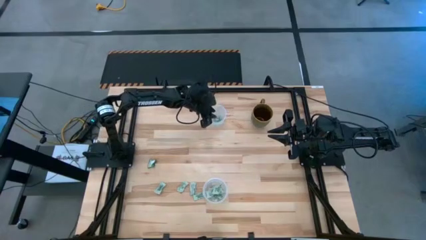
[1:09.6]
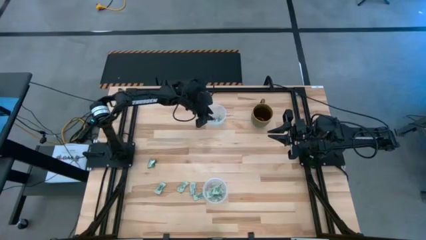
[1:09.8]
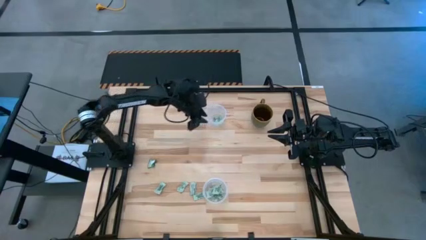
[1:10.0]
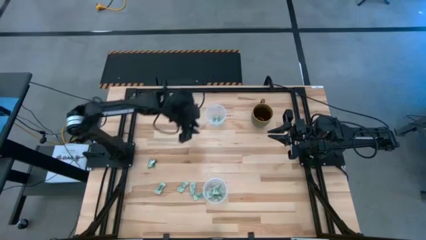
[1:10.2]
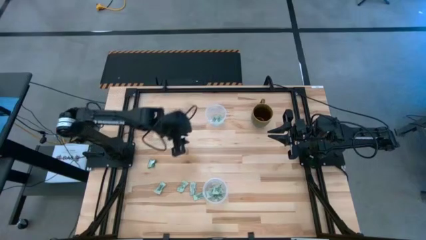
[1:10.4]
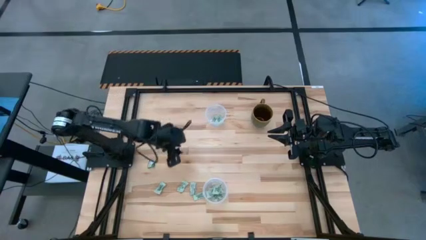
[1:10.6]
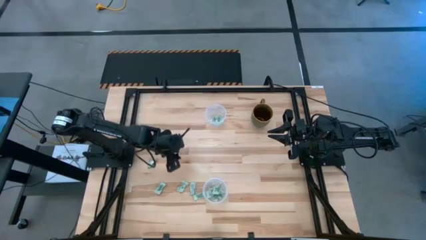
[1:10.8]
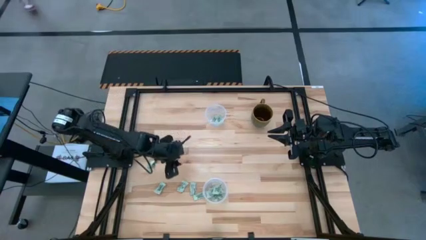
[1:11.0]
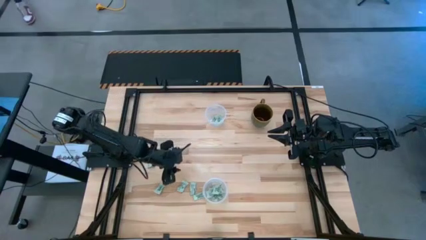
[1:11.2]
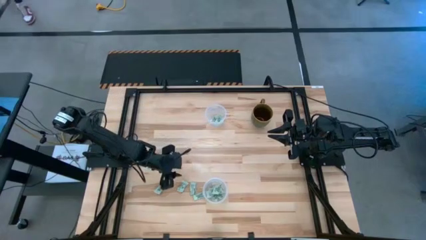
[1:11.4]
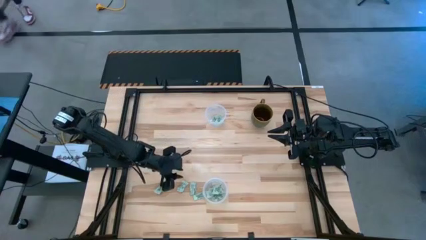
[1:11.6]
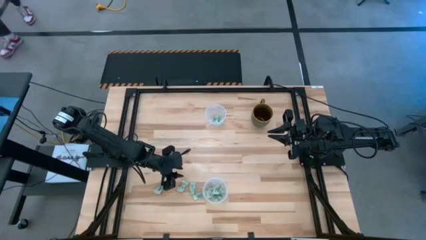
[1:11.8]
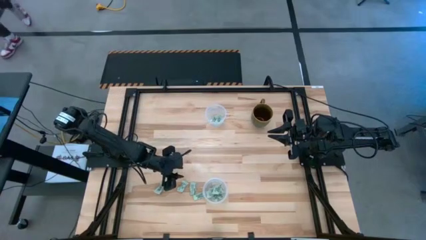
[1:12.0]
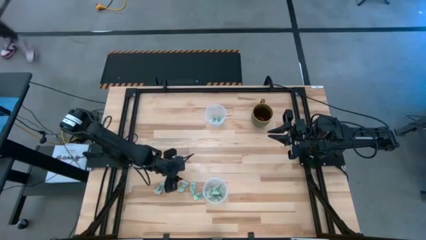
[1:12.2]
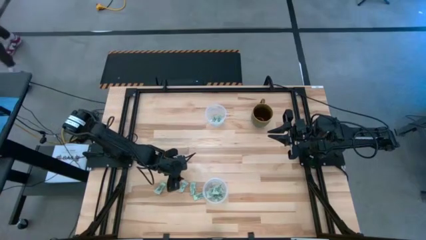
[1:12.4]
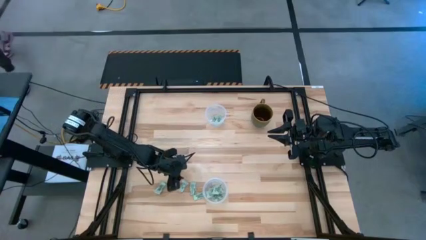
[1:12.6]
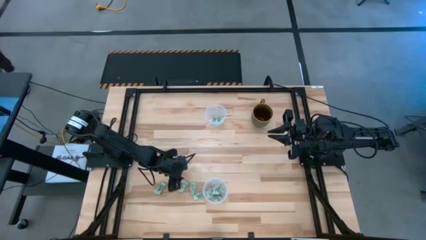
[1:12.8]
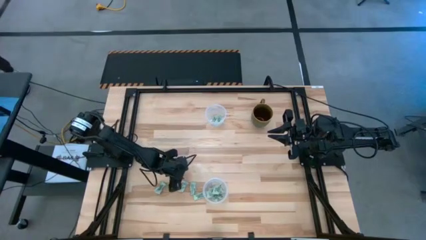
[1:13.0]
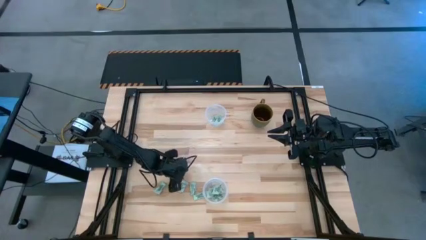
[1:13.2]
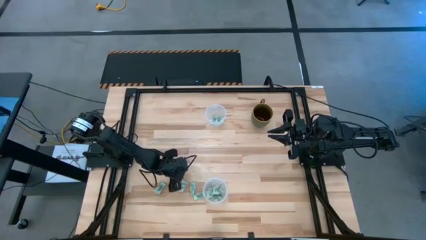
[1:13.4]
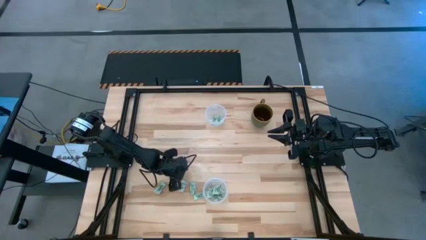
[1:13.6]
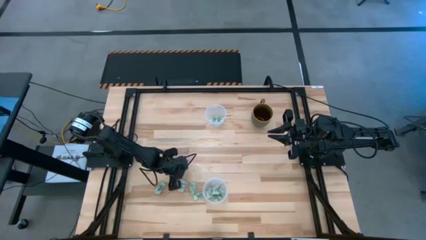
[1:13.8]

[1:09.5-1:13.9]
Task: Pick and place Stevia / Truvia into bins
Put the stevia packet into the top transparent container

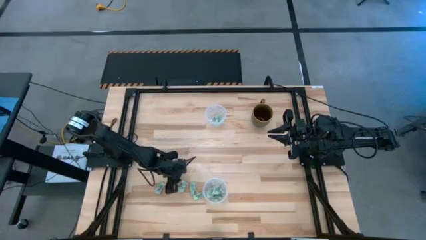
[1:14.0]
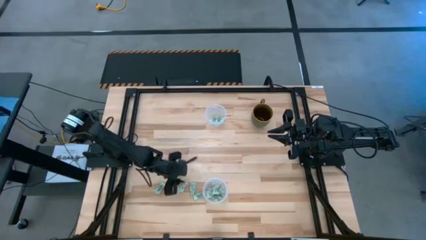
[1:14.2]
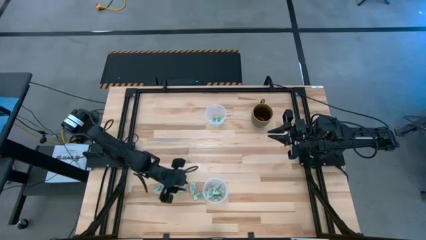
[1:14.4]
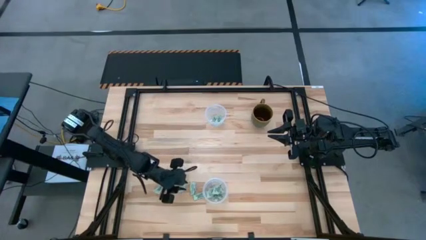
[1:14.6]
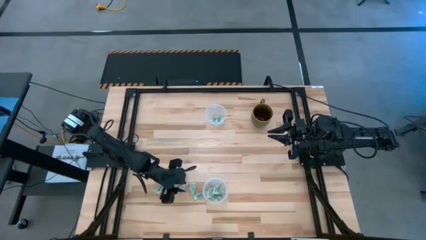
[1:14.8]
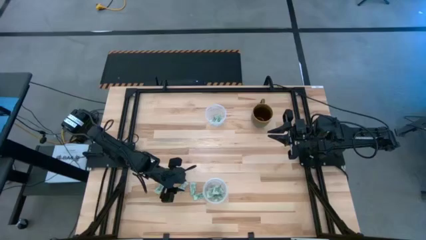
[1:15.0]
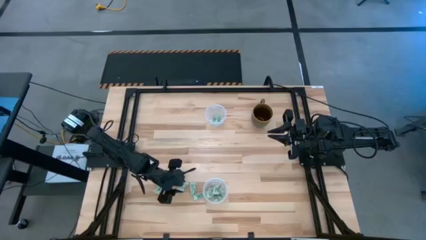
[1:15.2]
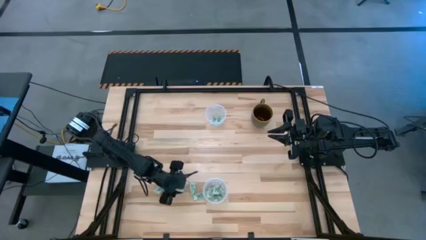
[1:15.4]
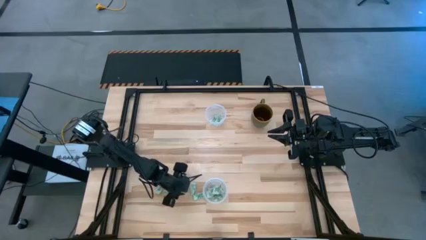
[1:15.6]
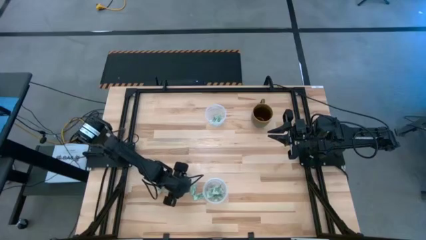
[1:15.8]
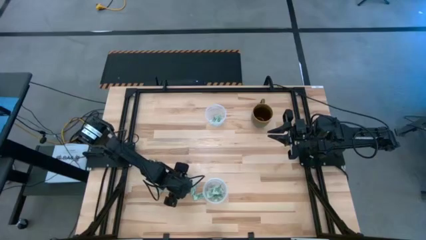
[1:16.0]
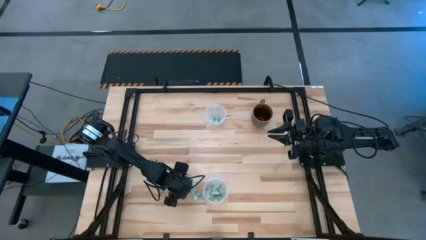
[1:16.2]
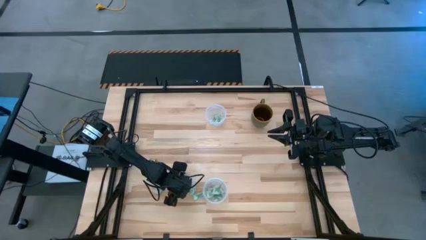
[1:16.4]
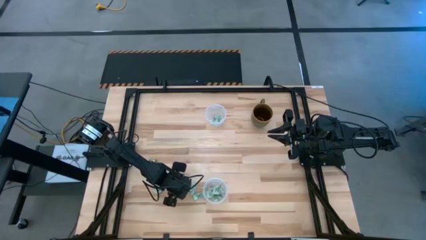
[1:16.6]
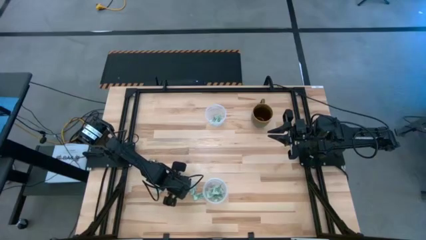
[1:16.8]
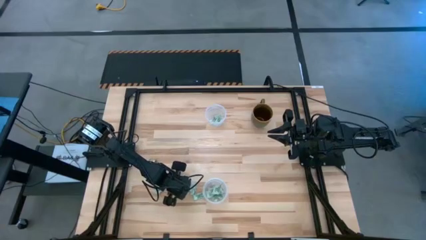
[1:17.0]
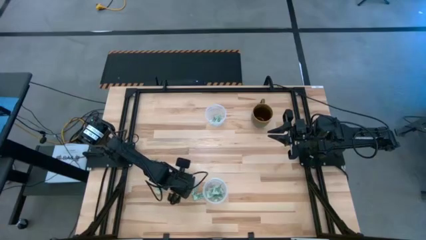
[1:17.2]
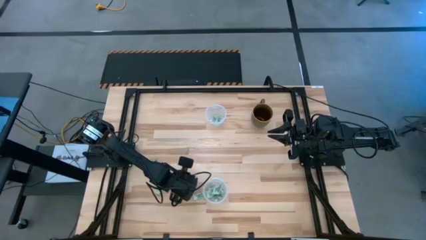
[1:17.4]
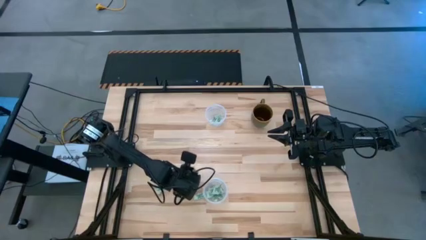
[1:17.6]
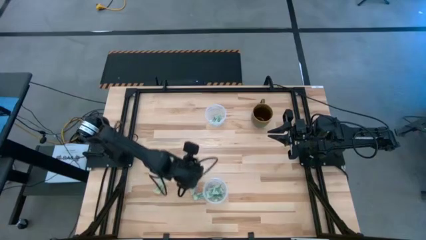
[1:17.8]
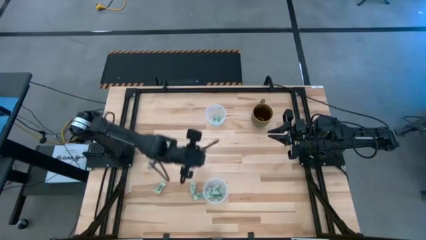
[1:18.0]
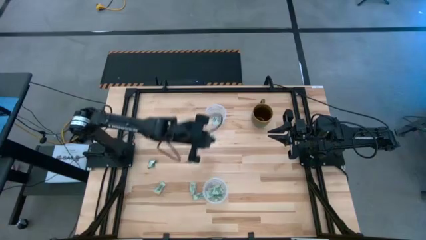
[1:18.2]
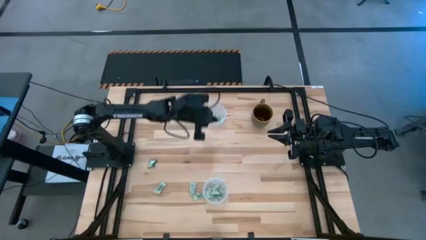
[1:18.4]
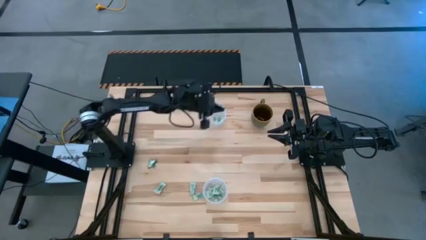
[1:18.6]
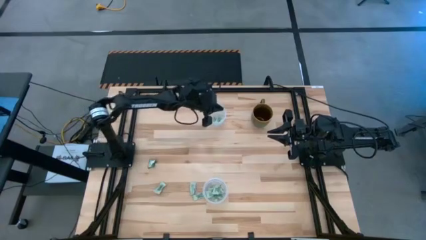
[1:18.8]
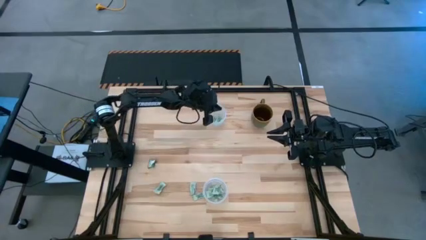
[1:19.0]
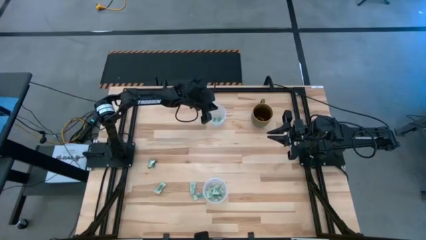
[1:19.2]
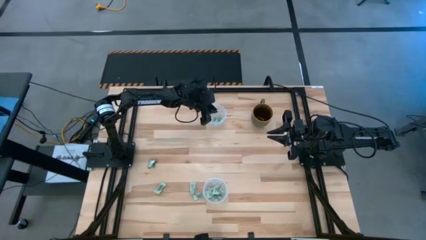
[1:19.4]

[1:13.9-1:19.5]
Put the stevia packet into the top transparent container

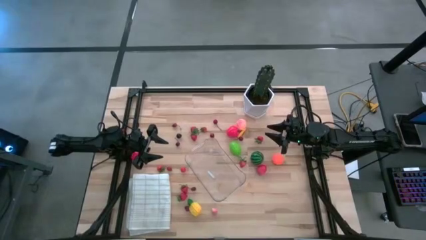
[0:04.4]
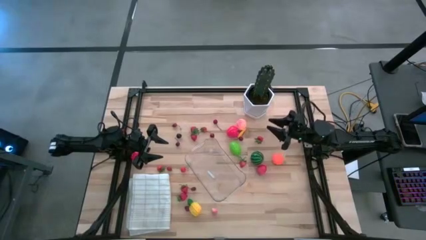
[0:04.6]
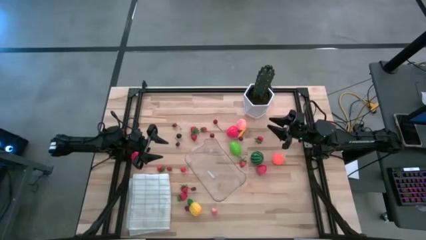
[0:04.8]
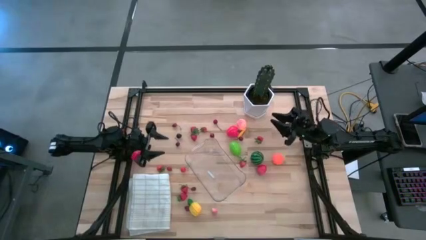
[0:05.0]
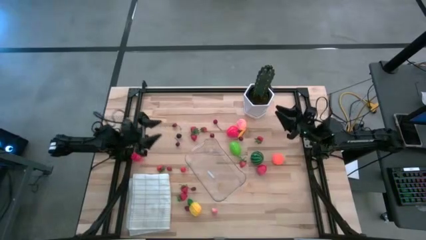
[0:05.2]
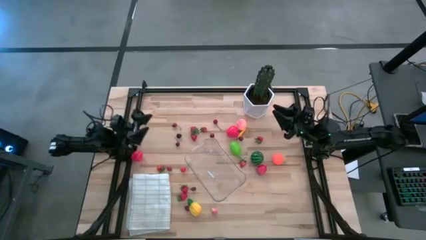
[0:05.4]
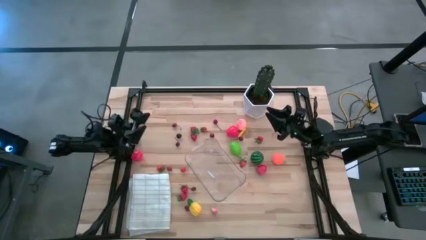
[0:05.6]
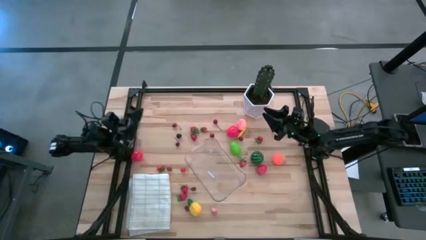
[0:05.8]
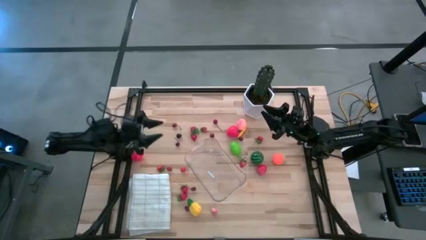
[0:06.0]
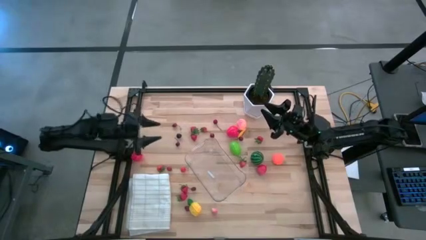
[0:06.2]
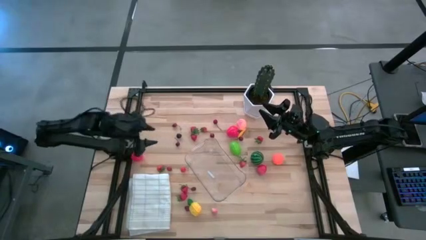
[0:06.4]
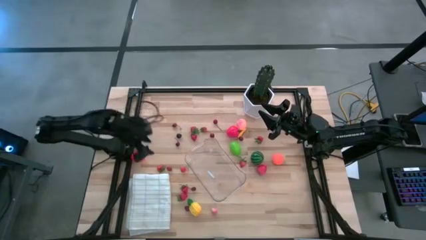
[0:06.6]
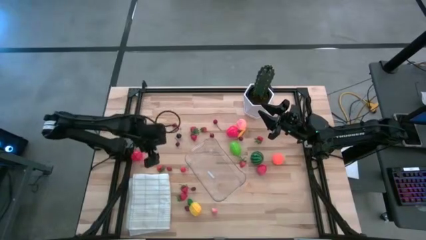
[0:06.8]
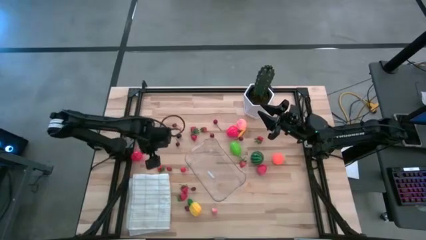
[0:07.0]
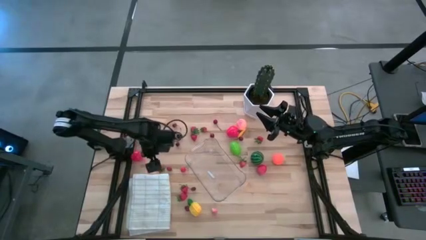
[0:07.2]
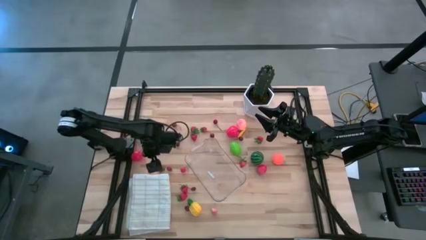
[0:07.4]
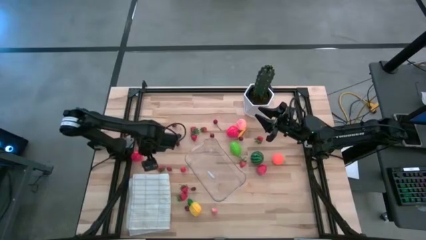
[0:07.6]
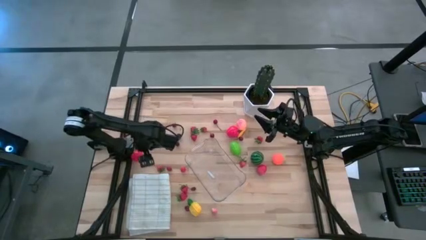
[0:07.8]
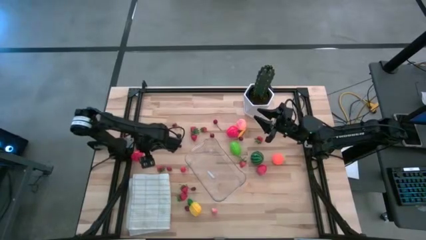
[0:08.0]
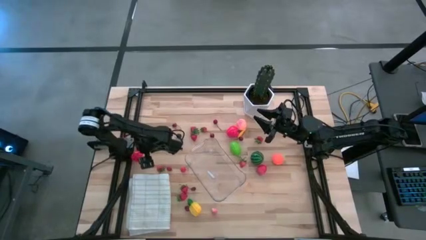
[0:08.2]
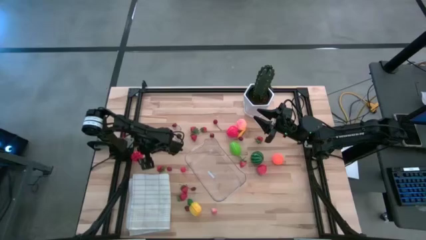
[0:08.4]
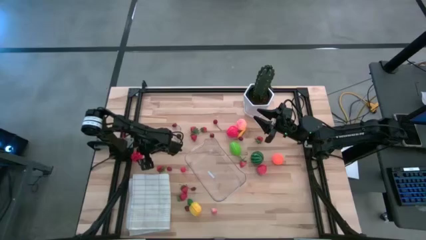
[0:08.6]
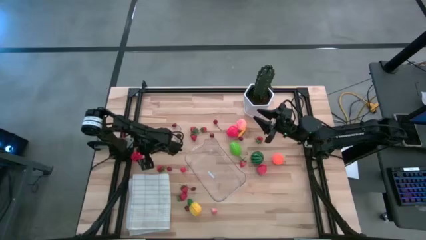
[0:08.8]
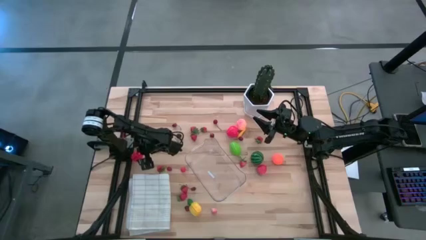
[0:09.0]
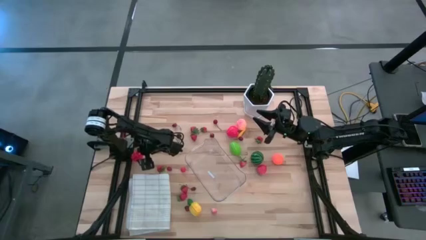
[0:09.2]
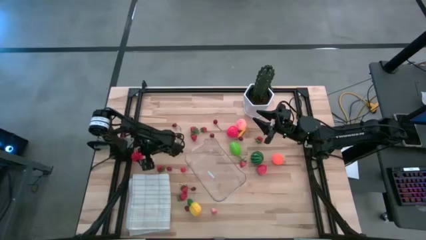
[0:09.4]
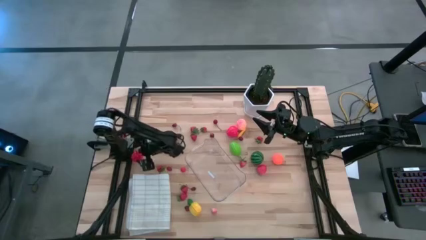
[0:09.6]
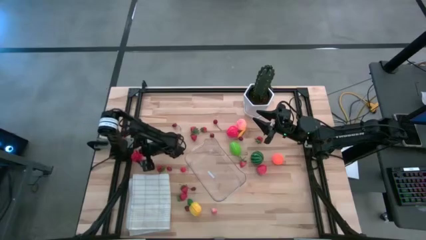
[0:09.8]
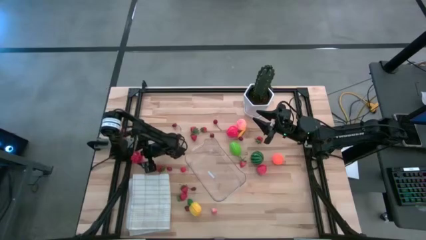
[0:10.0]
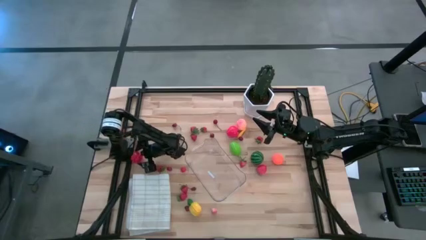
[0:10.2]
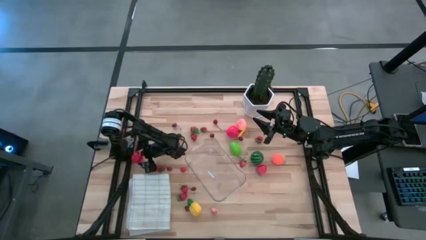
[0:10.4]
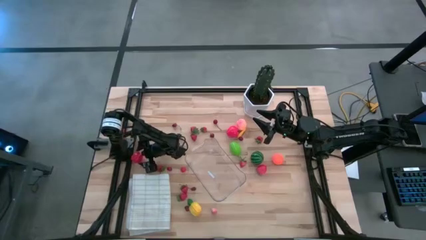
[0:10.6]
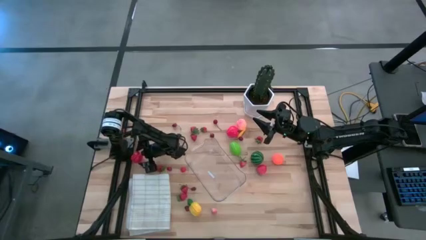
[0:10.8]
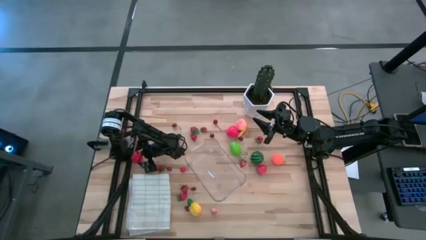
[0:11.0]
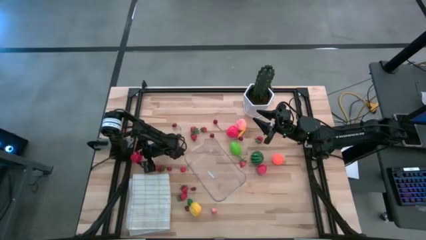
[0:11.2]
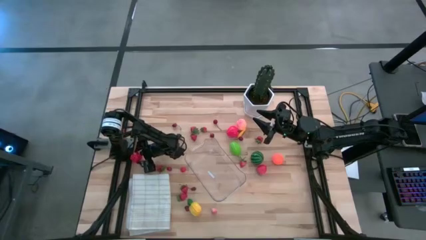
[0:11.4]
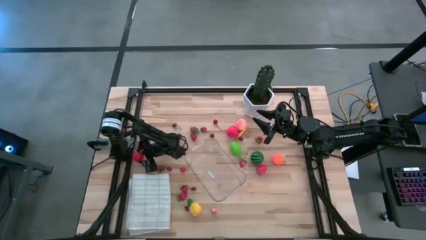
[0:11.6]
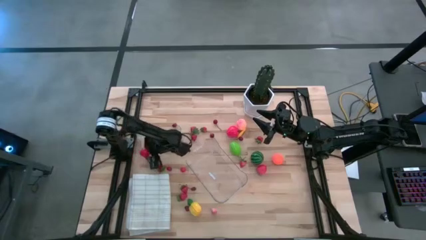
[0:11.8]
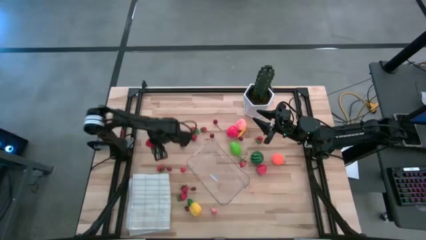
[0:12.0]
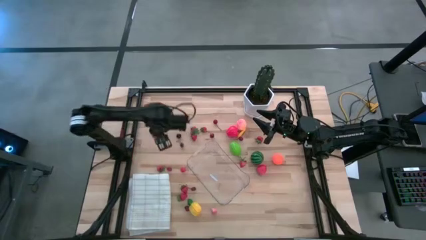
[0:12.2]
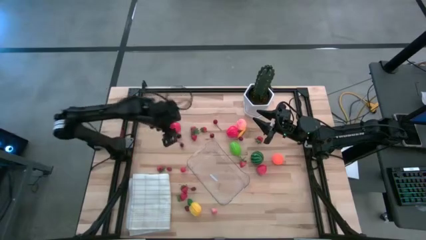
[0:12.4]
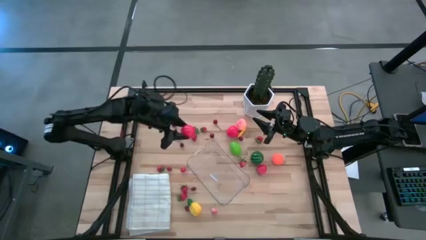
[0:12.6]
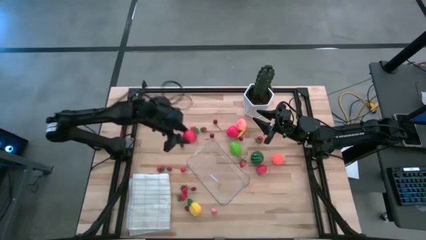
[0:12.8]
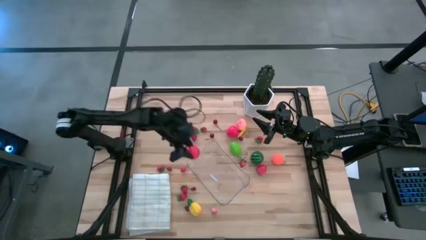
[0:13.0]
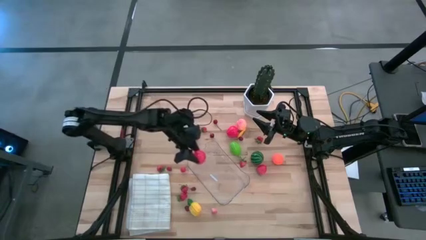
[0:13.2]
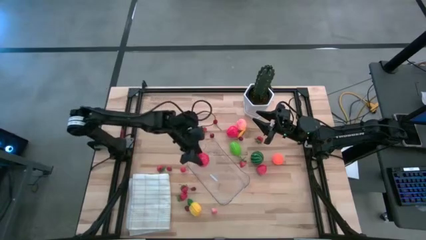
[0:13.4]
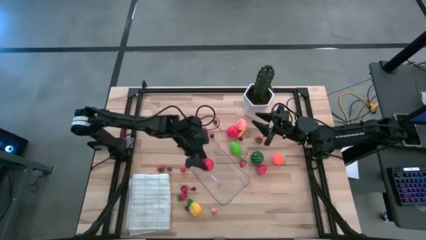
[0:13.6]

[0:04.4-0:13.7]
Task: Pick and placing Produce into tupperware
Put the red tomato into the transparent bin
